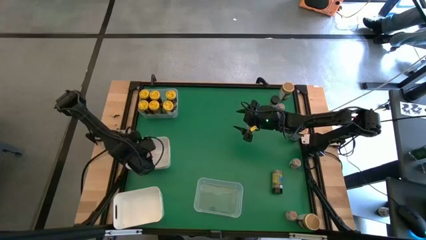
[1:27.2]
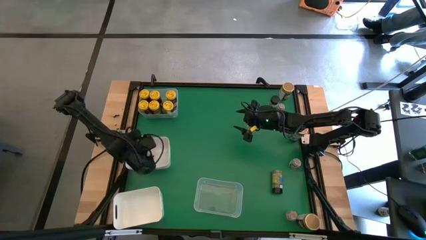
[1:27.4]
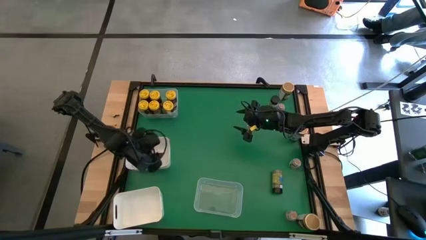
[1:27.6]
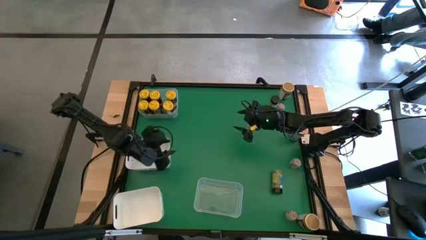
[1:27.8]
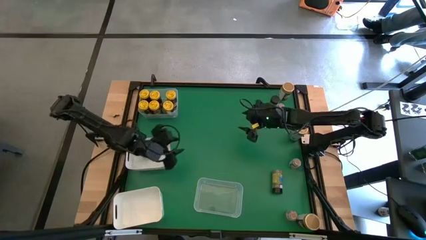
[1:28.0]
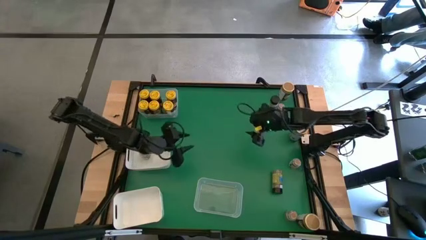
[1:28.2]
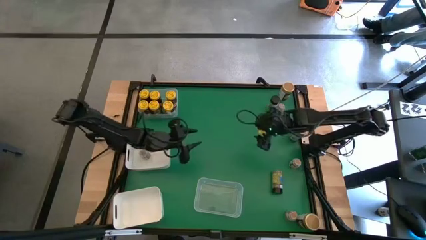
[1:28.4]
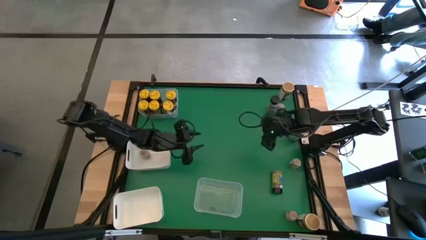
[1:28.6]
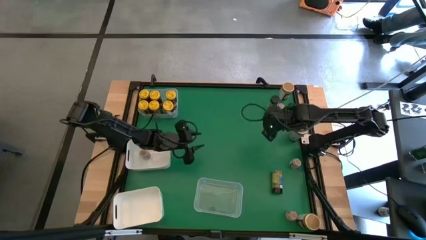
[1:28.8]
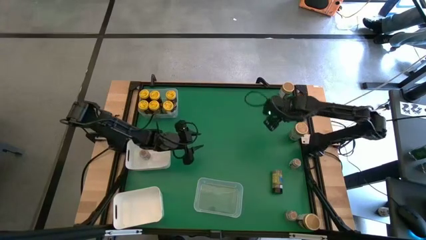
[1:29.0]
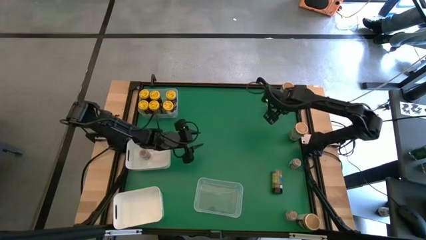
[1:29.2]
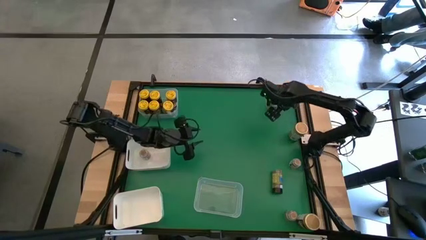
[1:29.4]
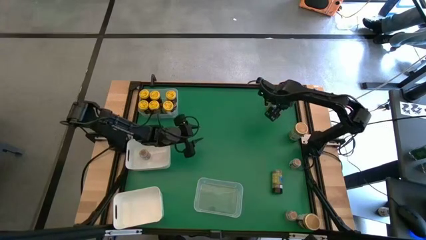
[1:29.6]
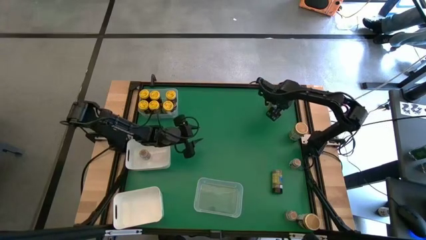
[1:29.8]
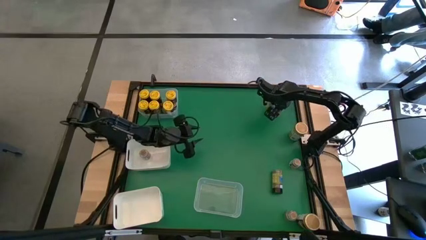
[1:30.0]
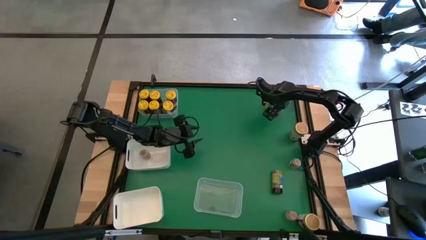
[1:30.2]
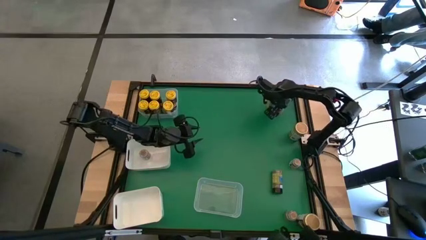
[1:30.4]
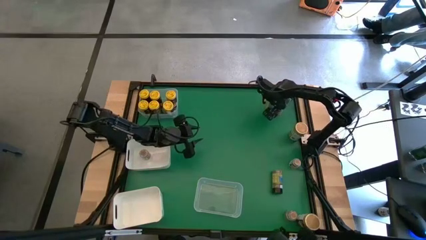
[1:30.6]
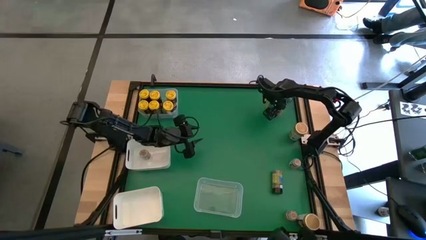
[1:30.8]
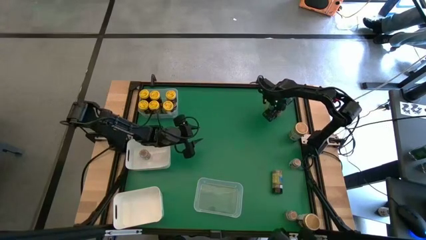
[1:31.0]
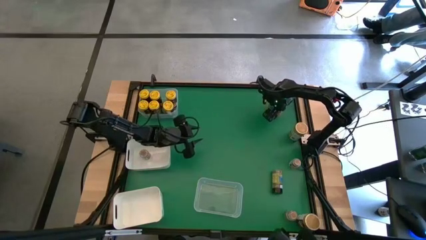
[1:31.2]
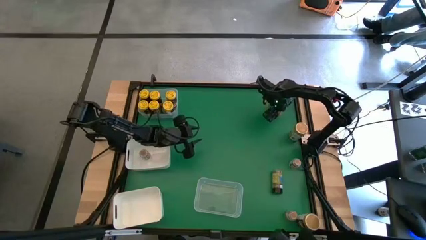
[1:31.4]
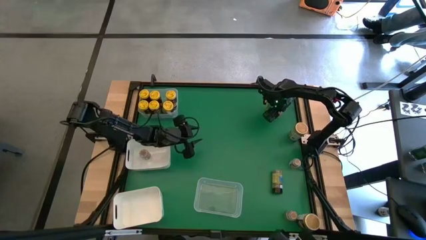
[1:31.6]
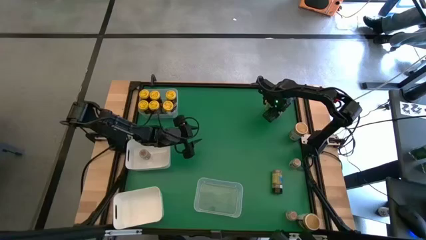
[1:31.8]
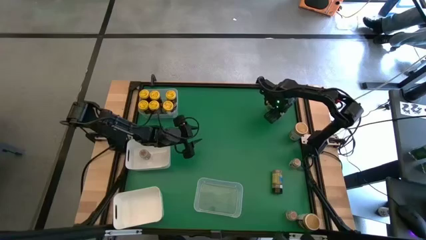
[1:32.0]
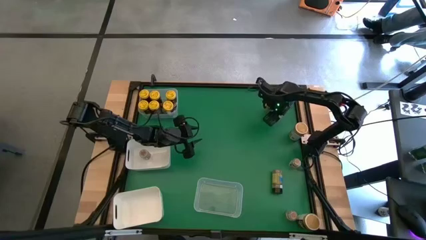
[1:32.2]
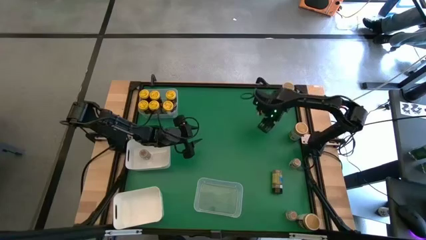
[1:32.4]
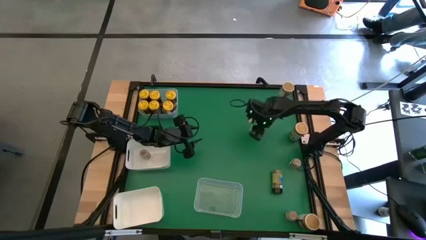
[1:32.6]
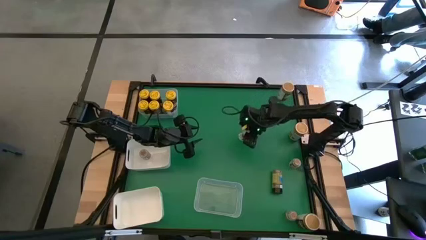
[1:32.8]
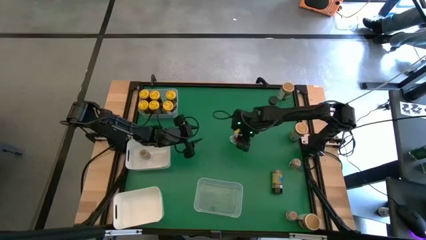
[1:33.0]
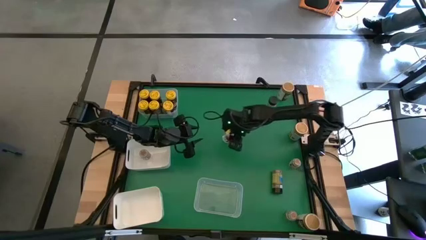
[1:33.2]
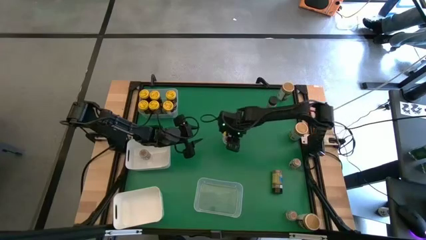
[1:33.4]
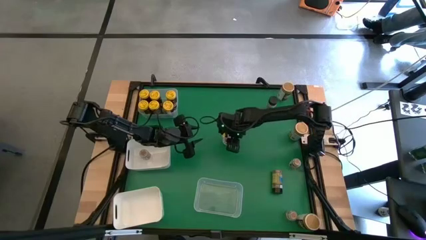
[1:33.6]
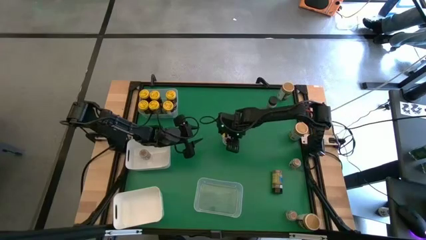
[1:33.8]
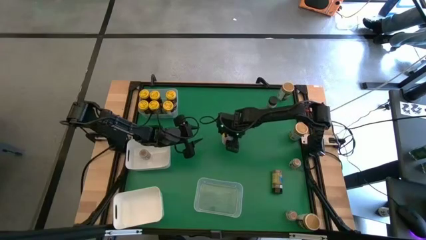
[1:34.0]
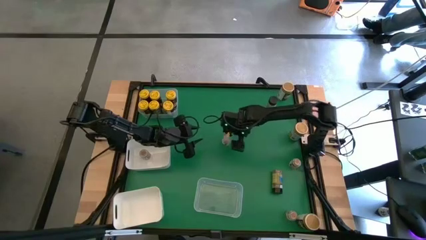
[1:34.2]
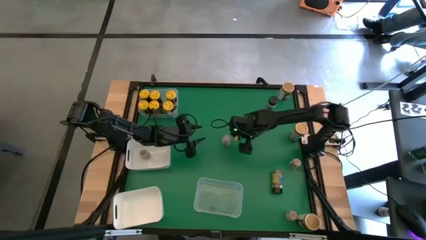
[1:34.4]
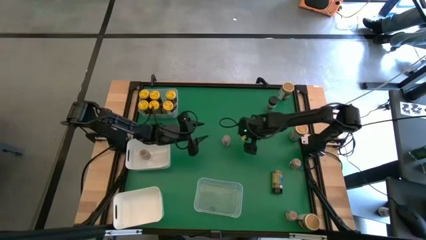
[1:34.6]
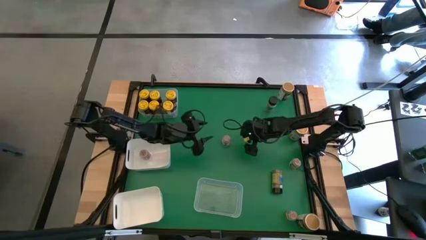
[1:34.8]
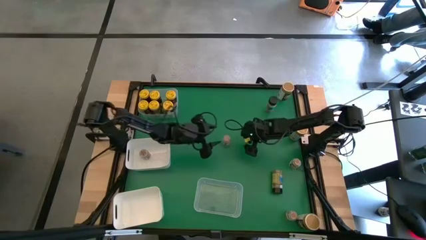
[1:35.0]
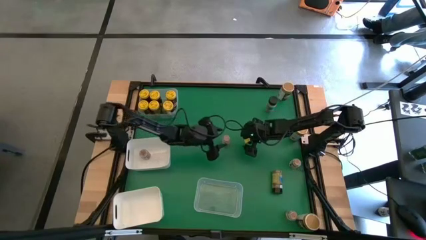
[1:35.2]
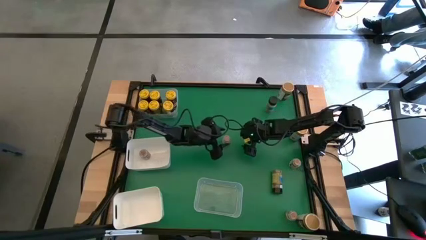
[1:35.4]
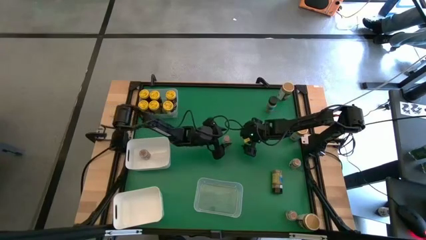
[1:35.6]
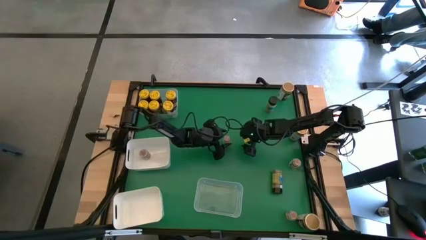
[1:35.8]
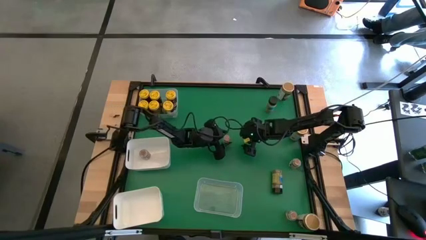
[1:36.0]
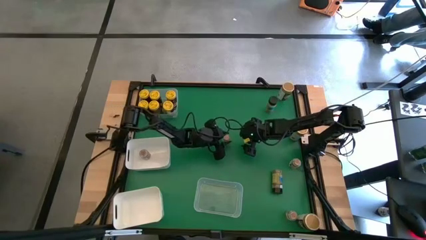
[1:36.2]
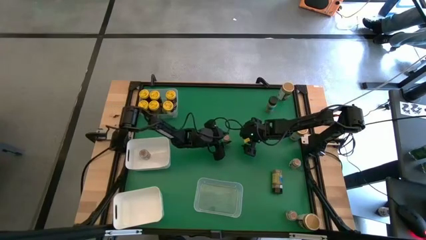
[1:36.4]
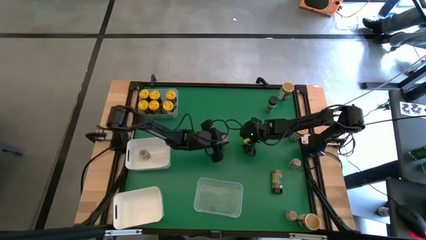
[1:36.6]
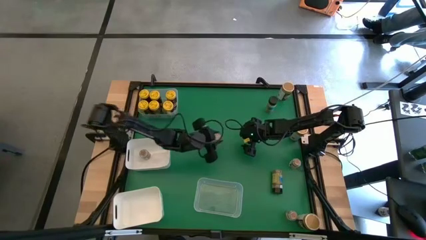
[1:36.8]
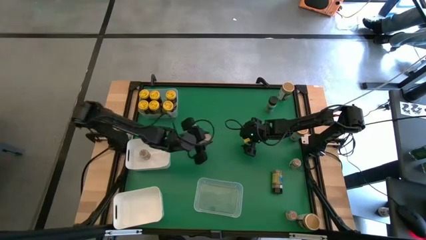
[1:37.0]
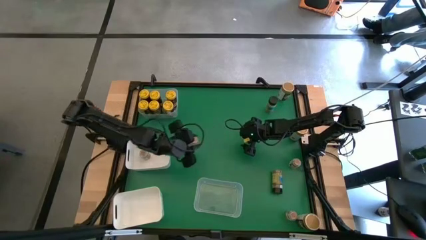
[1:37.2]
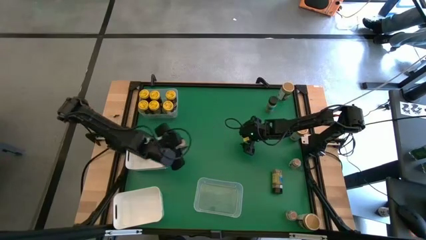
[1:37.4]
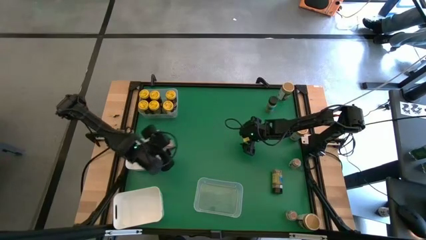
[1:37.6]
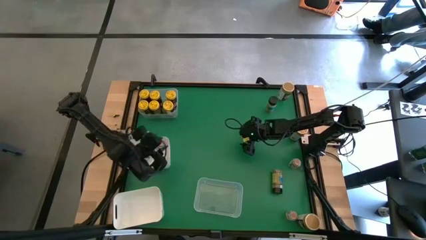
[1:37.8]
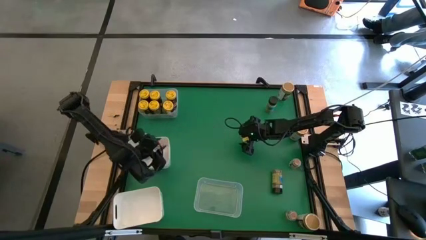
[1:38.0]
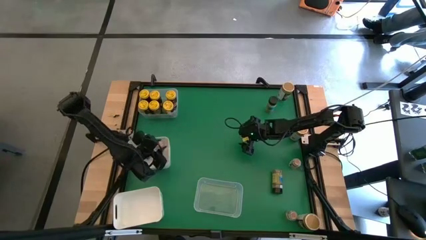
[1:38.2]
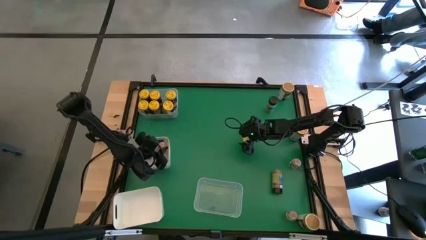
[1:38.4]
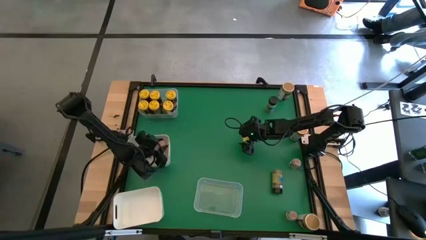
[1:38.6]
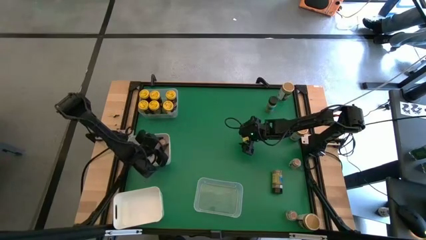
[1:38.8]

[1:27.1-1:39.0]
Task: Sort spices by type
Put the brown spice bottle into the top white bin

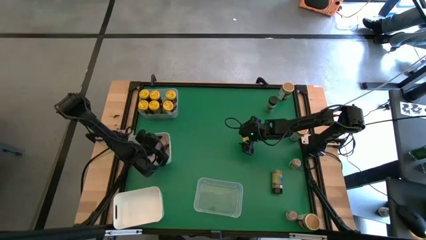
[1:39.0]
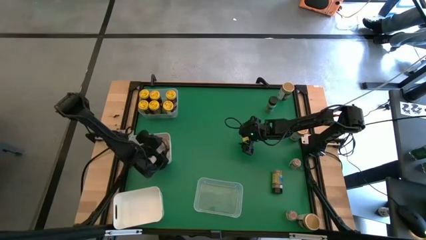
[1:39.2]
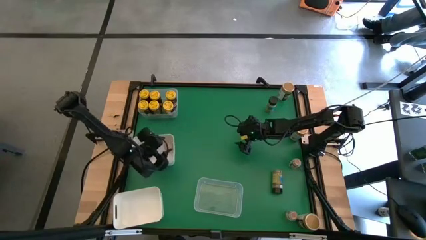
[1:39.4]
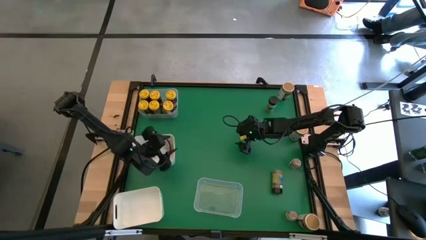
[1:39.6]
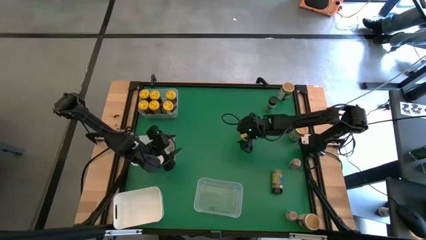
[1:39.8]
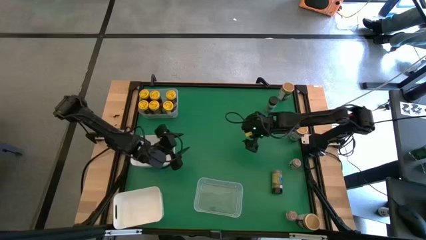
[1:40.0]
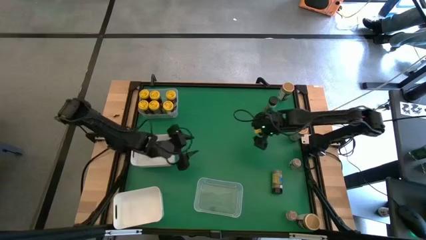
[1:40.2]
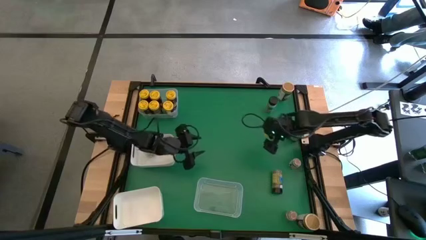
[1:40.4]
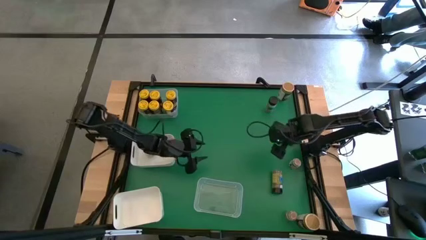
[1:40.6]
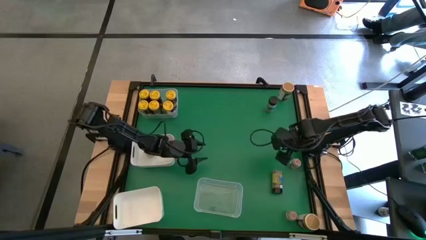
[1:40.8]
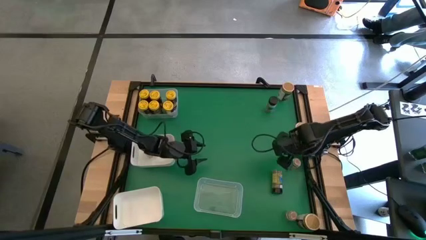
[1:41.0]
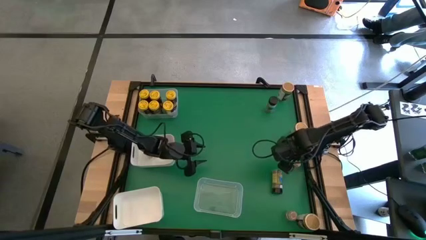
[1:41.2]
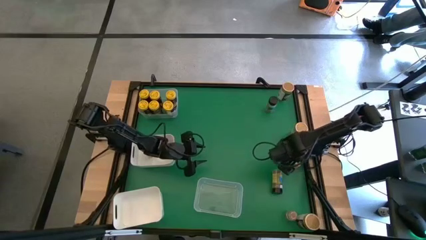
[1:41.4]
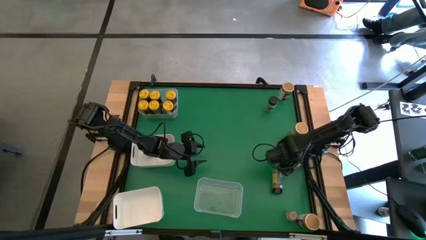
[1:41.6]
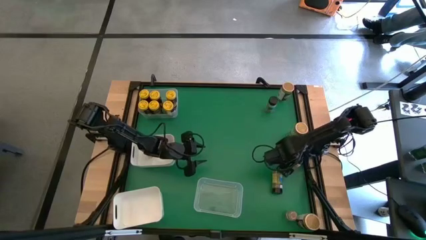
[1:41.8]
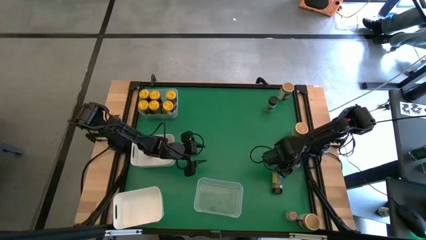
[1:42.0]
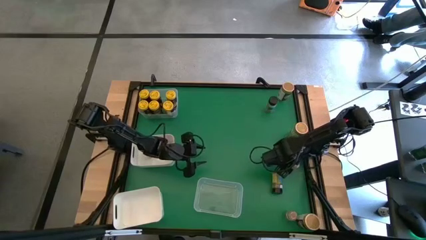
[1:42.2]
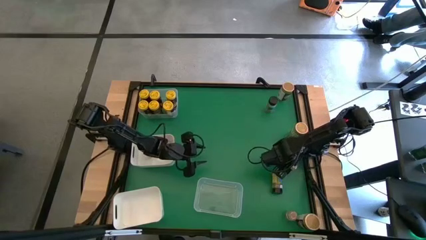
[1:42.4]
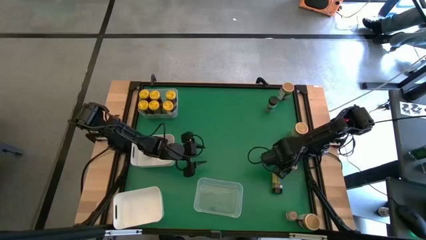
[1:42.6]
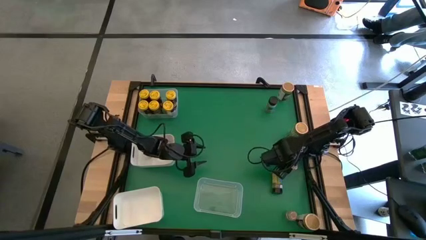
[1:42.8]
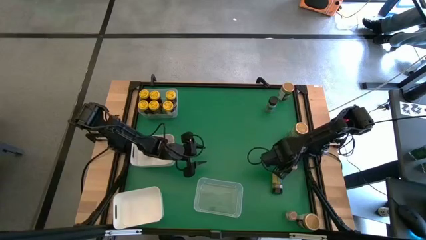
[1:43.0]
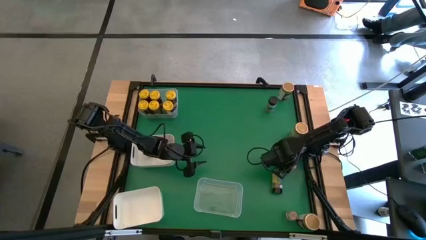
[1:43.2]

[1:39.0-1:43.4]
Put the brown spice bottle into the top white bin

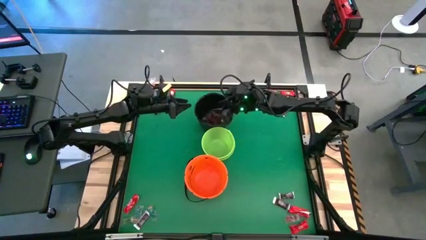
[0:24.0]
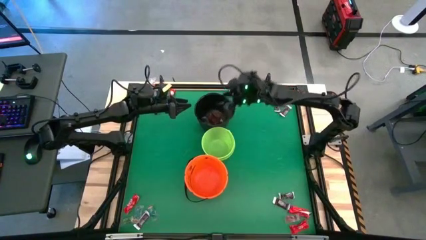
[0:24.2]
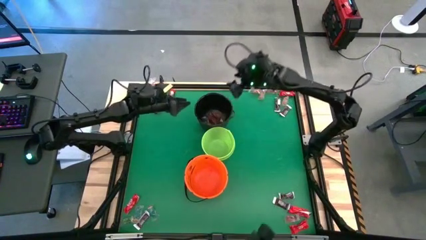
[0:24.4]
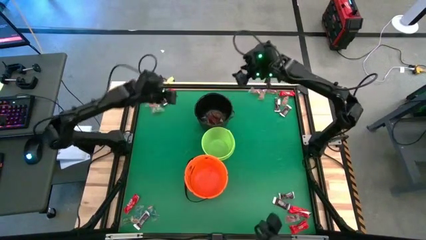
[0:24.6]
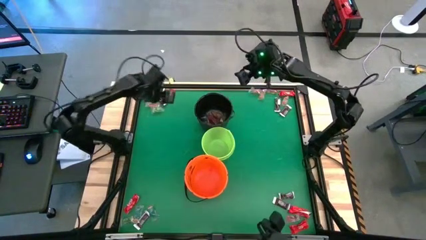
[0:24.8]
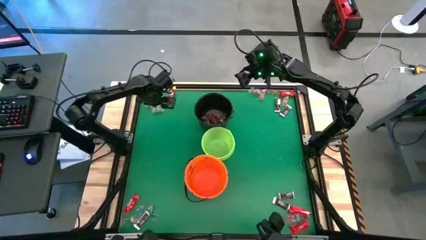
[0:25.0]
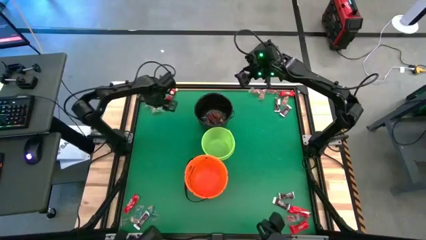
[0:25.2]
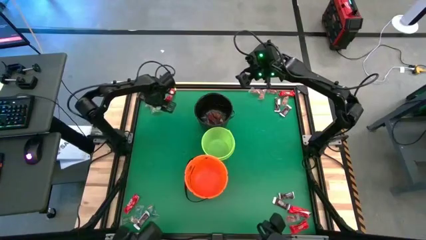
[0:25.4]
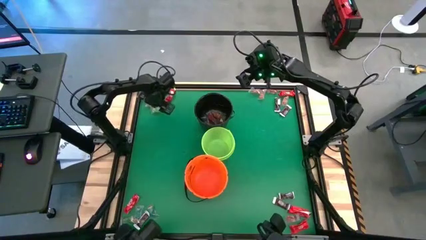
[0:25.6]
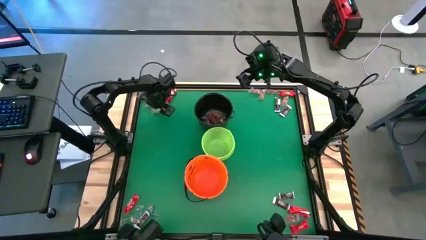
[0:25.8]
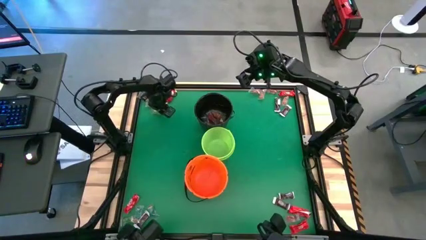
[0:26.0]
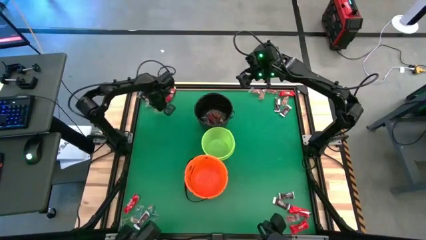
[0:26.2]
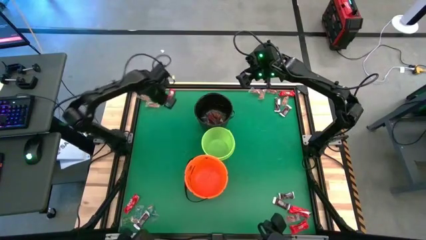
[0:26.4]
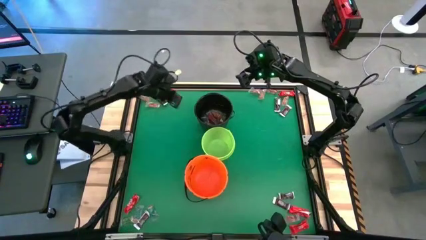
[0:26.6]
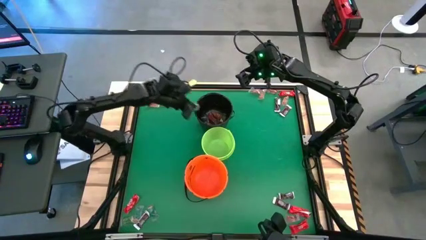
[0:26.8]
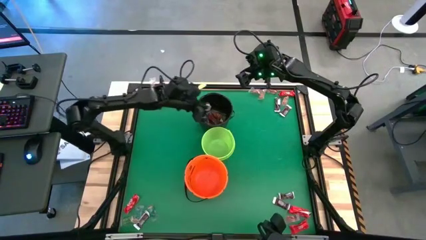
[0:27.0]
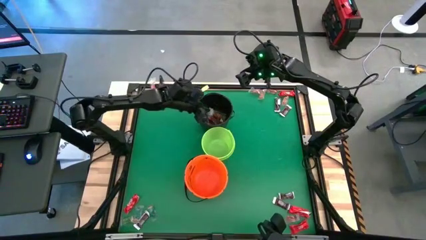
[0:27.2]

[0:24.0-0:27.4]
Task: Sort candy by brand, put in halloween buckets
Put the green gummy into the black bucket
